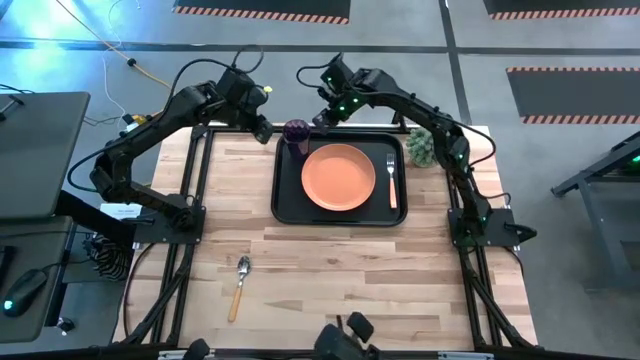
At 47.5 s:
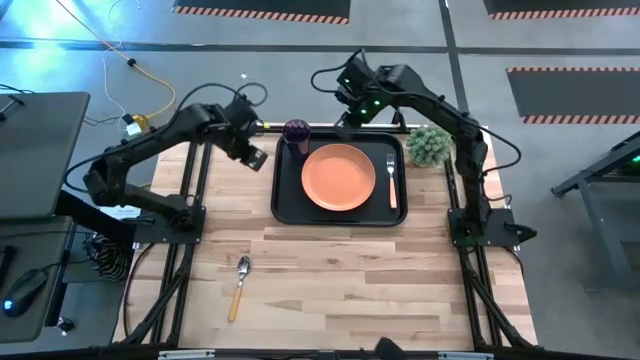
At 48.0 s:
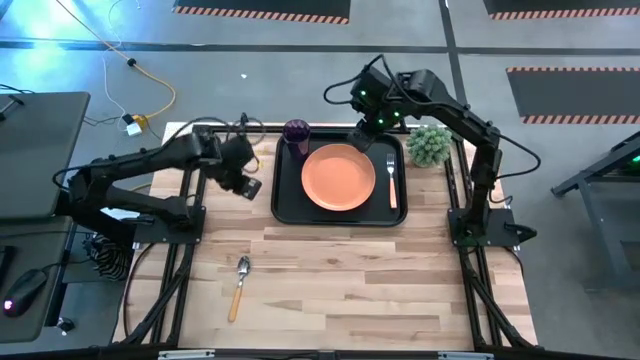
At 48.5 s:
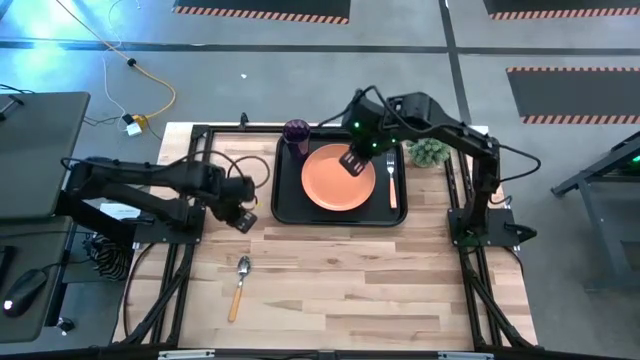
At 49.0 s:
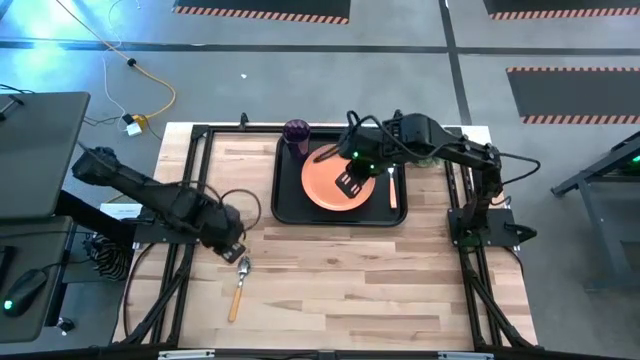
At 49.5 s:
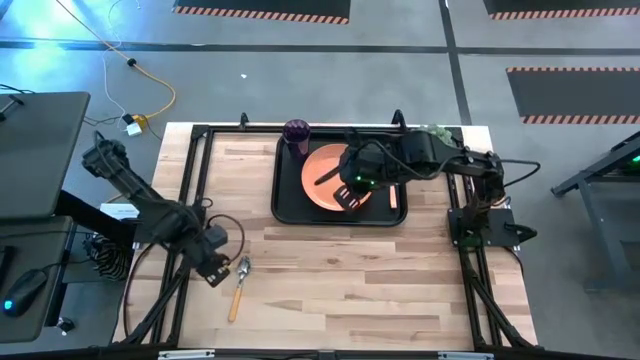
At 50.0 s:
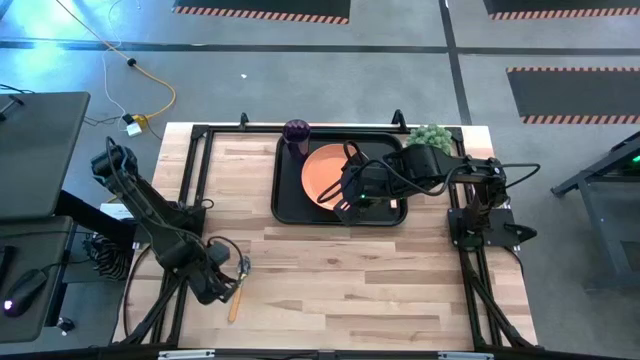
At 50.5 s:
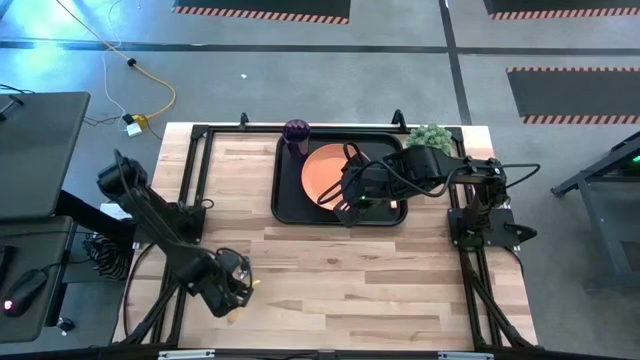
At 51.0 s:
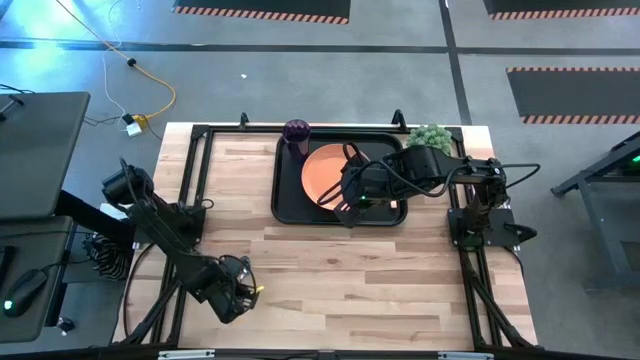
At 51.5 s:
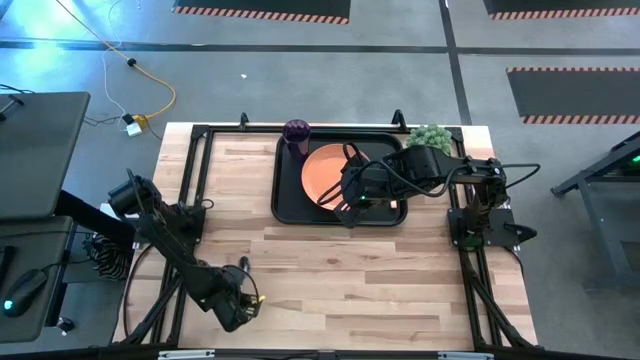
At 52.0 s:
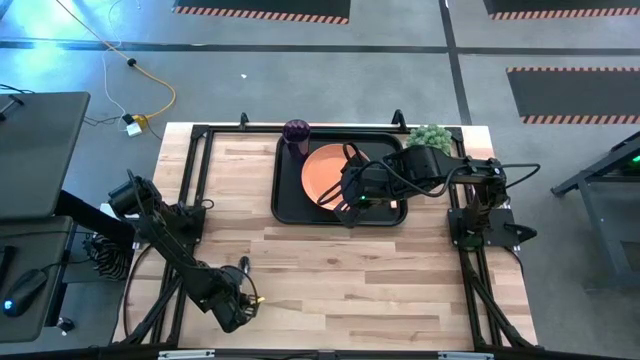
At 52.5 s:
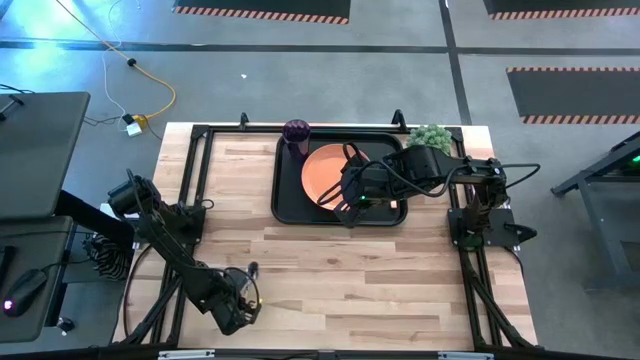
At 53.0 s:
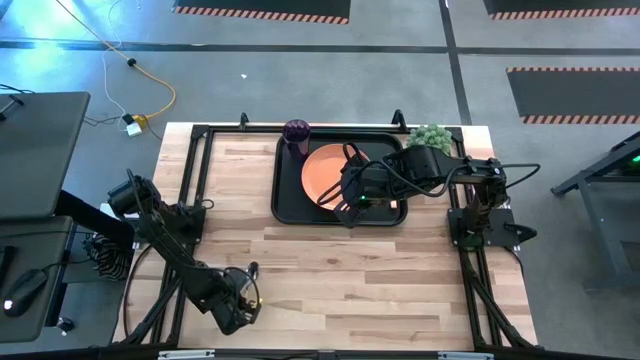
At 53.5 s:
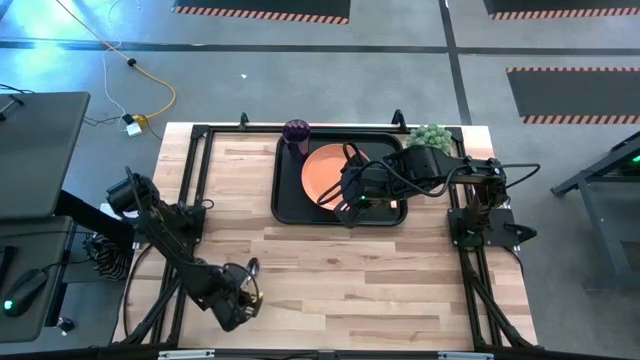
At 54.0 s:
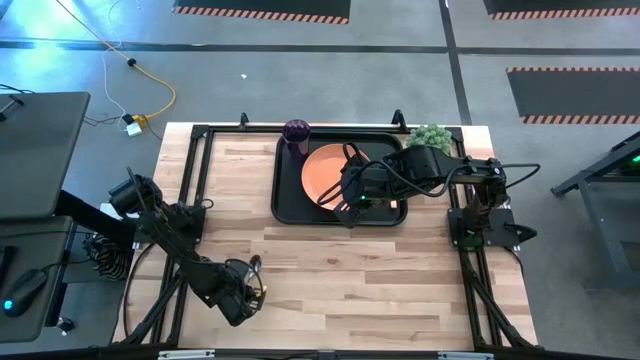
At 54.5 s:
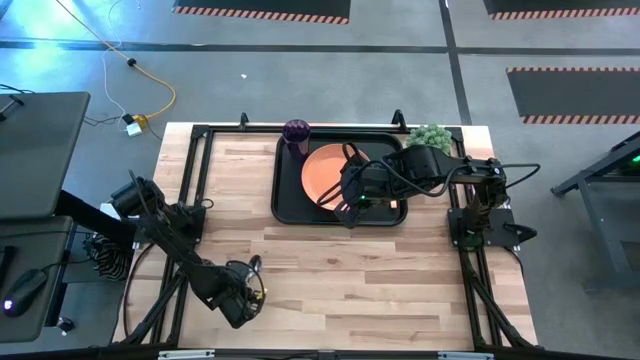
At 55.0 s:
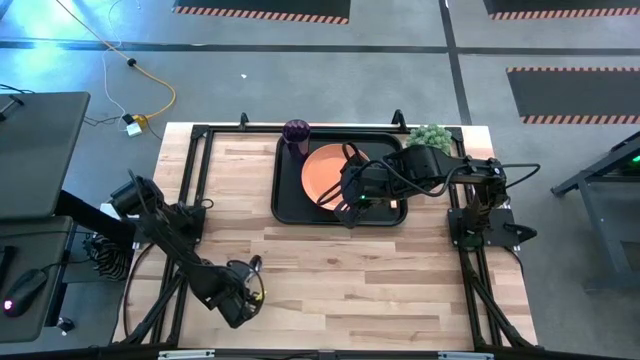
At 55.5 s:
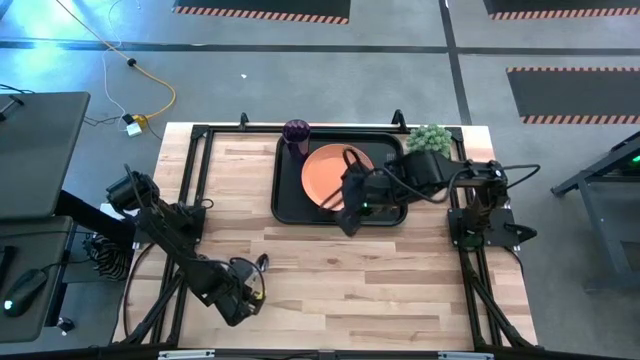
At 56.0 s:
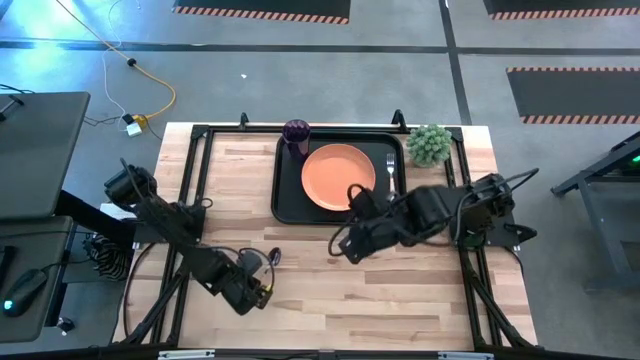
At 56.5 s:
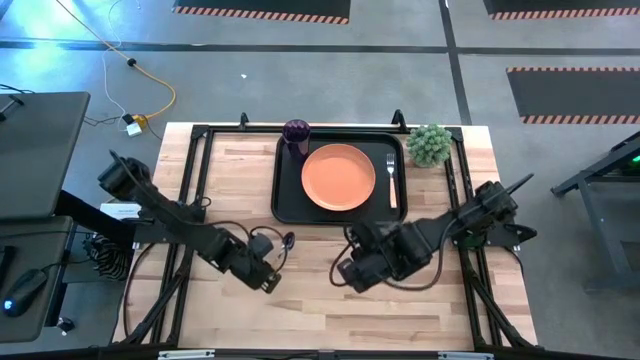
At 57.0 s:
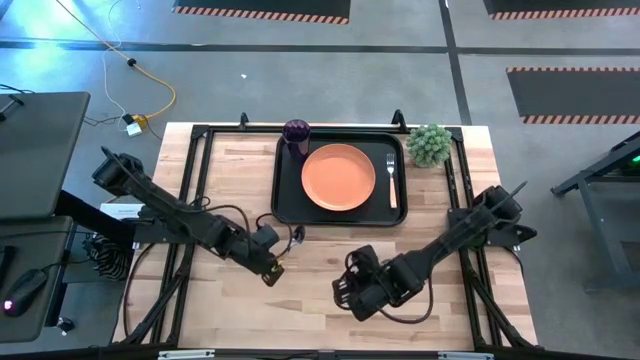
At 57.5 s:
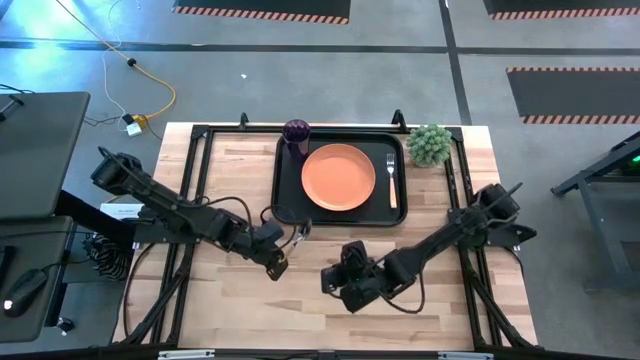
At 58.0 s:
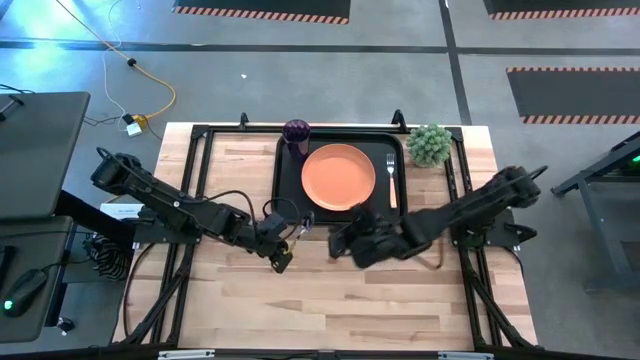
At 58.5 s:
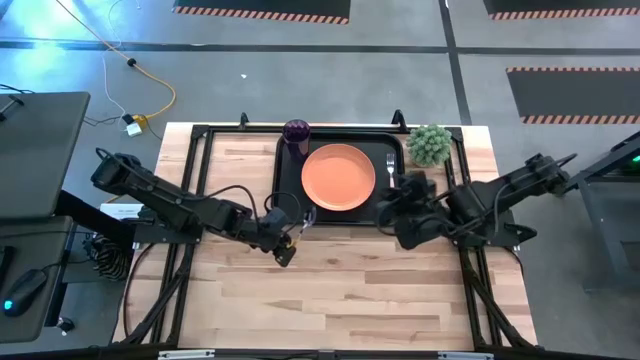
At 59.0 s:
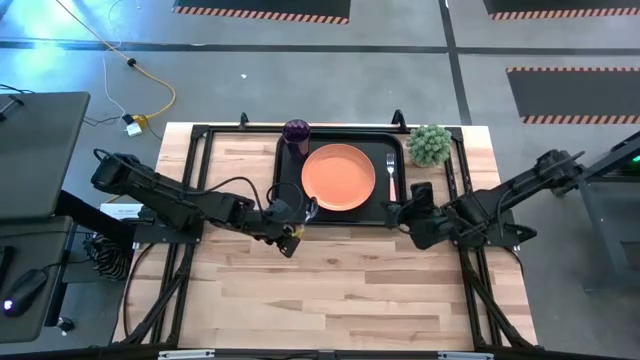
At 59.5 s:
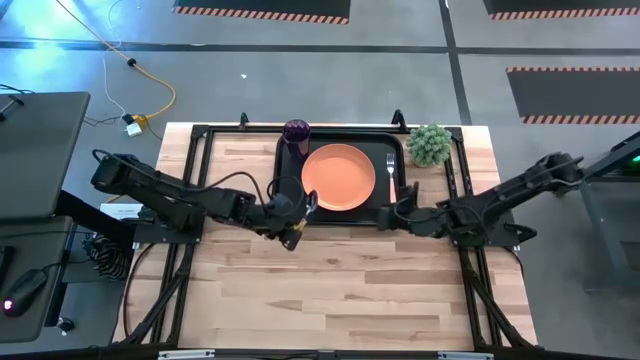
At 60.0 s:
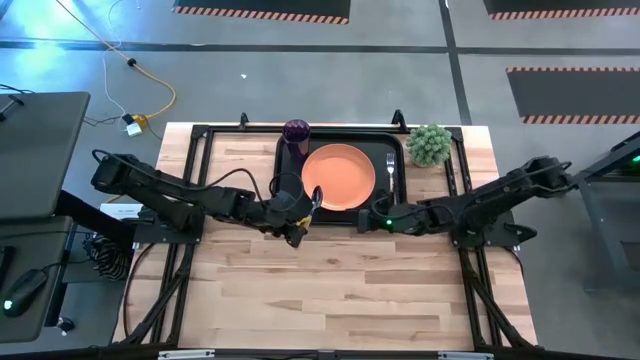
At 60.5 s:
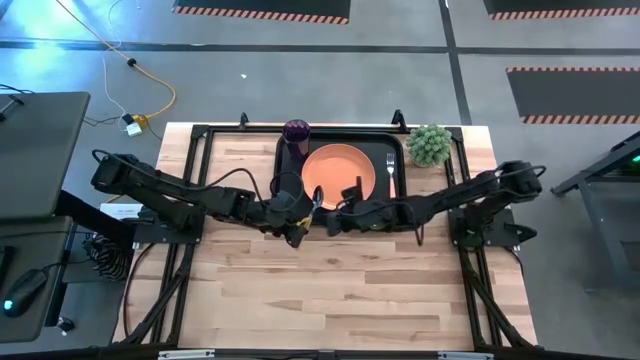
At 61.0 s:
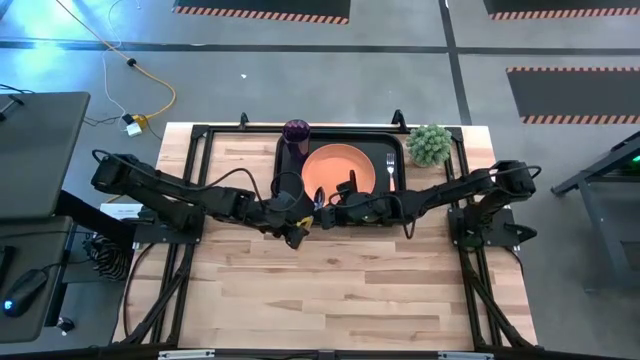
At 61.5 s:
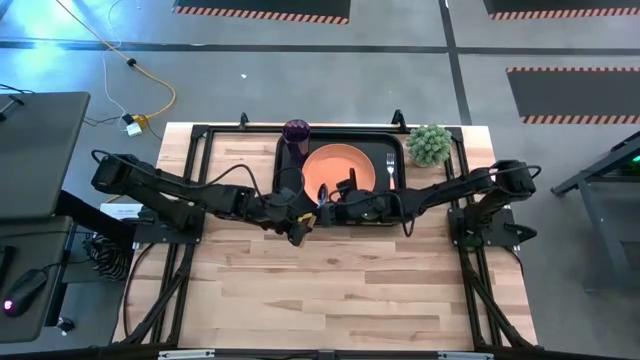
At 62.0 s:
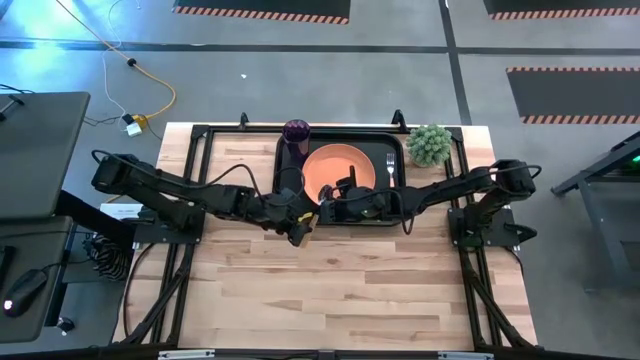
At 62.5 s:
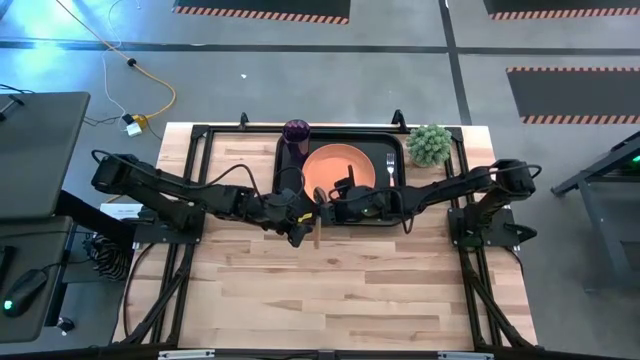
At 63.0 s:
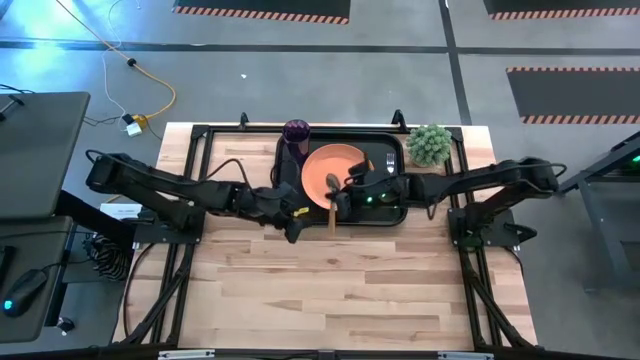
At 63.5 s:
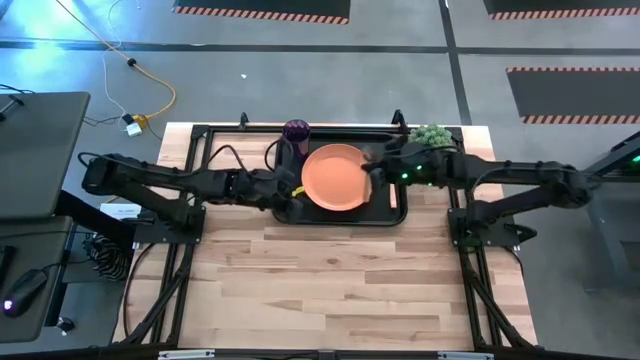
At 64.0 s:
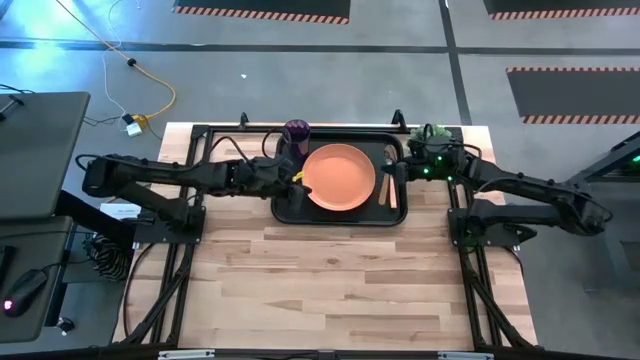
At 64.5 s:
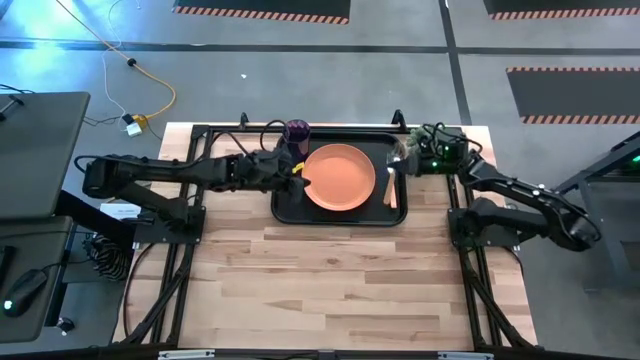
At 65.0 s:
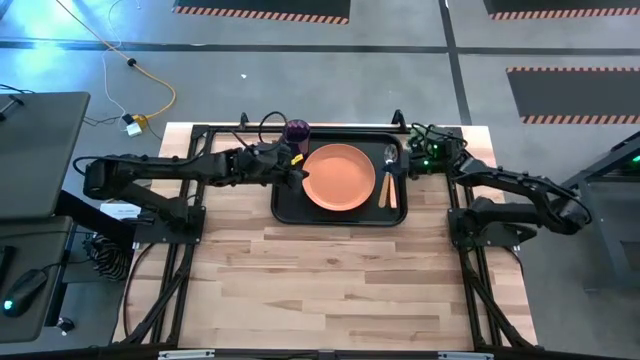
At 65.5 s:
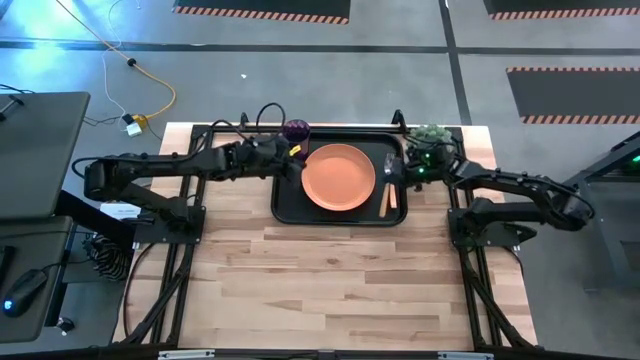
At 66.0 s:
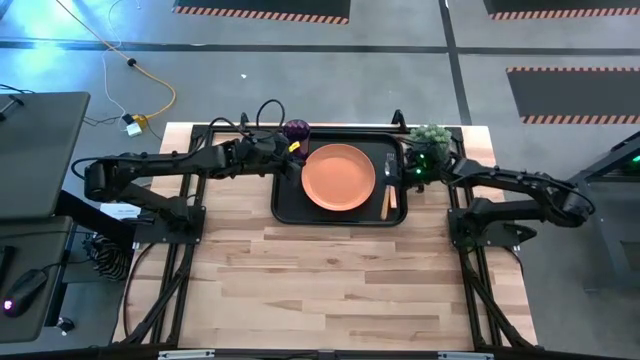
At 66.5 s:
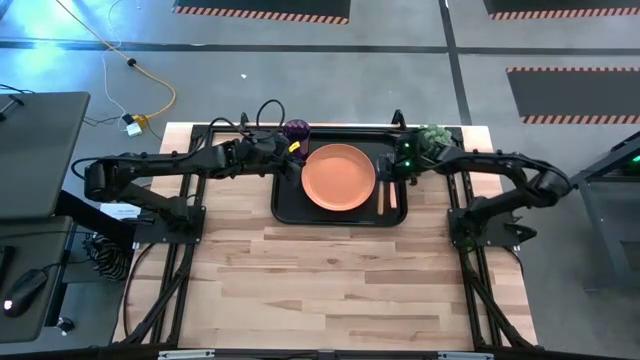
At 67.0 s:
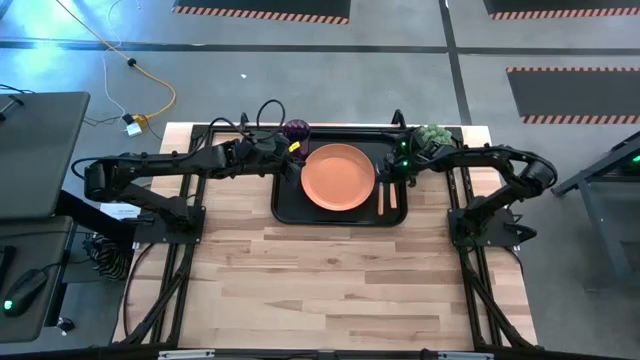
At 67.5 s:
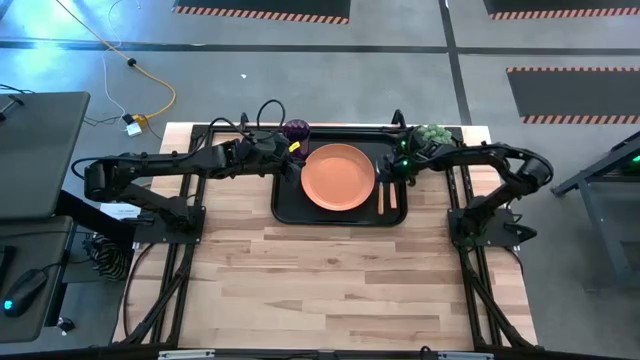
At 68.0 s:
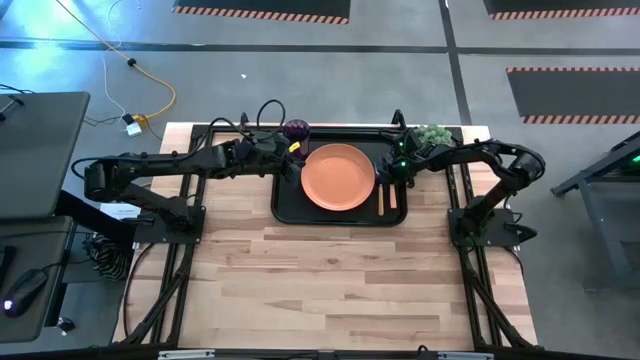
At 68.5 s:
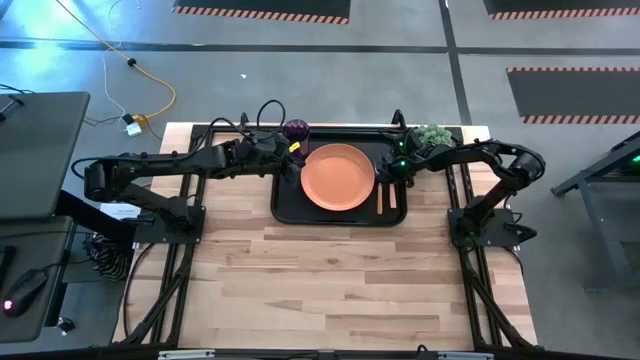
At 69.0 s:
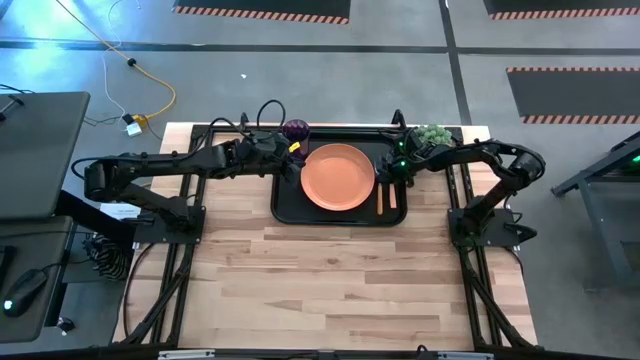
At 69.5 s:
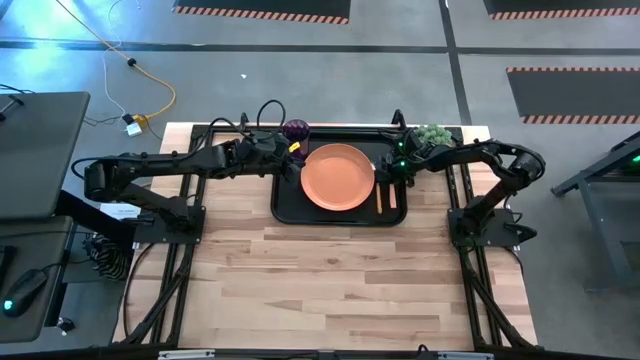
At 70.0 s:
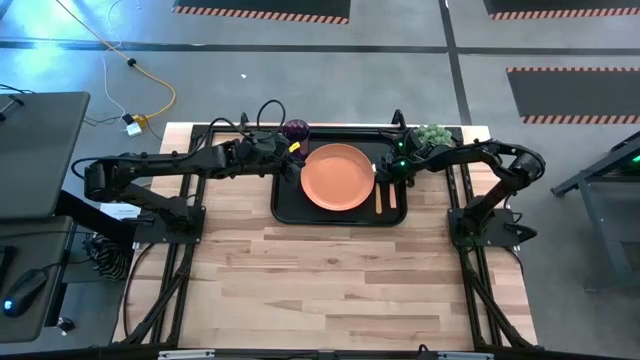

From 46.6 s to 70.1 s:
Task: Pick and place plate/cup/fork/spoon on tray
Put the yellow spoon on the black tray
